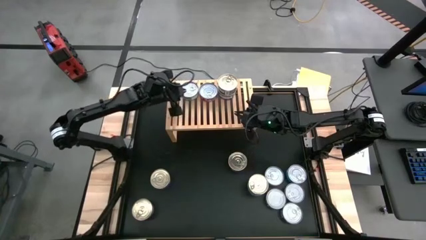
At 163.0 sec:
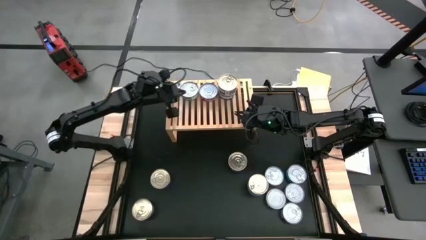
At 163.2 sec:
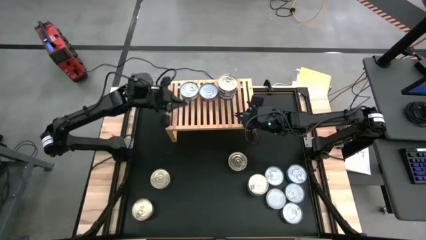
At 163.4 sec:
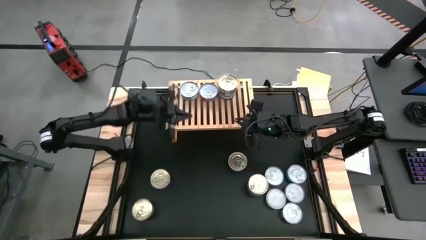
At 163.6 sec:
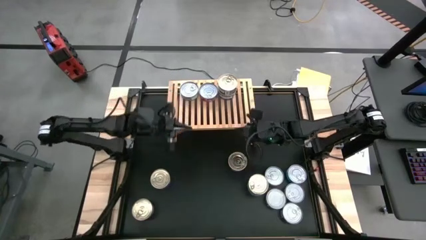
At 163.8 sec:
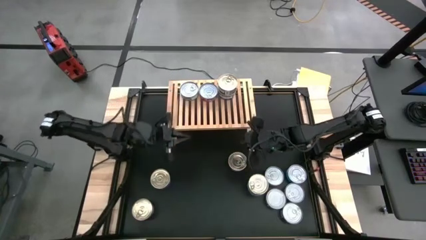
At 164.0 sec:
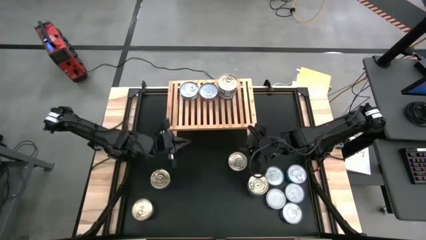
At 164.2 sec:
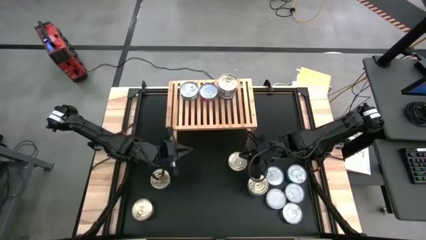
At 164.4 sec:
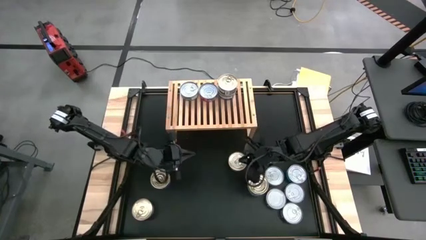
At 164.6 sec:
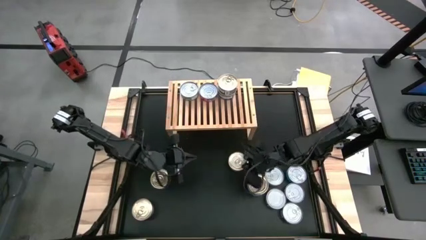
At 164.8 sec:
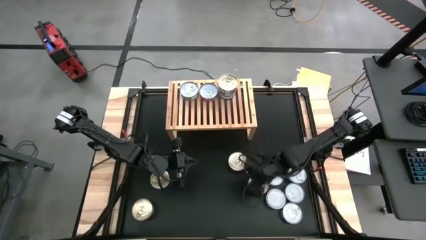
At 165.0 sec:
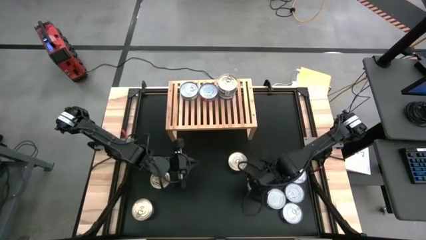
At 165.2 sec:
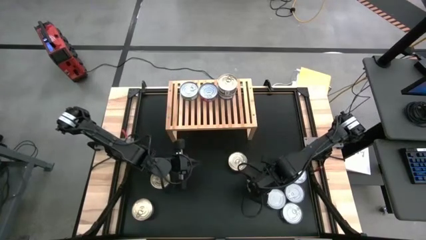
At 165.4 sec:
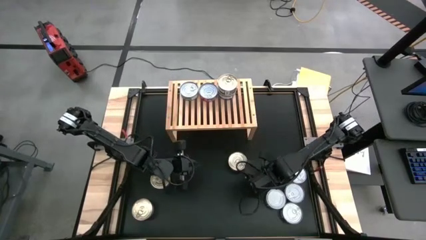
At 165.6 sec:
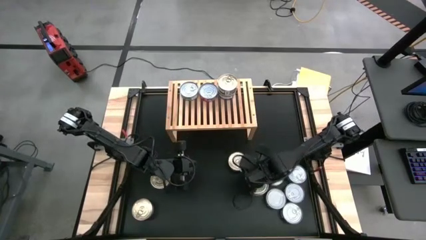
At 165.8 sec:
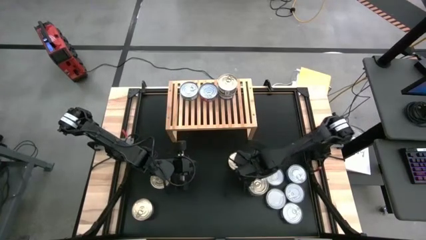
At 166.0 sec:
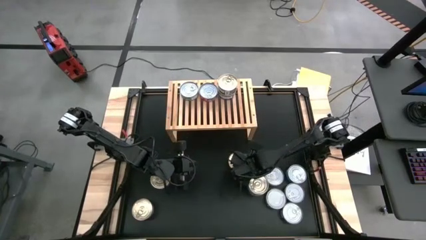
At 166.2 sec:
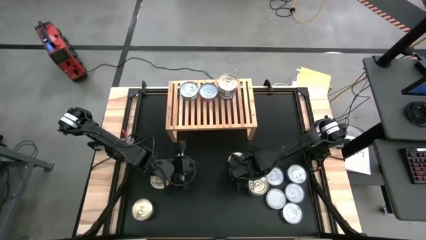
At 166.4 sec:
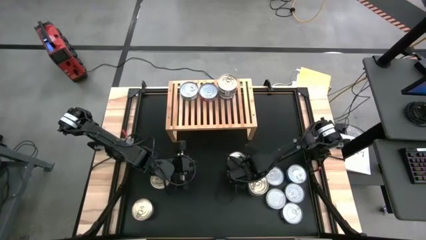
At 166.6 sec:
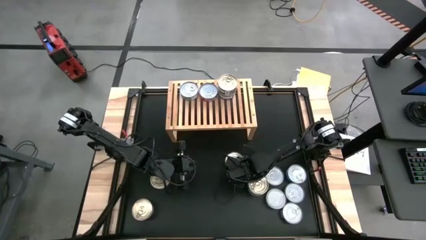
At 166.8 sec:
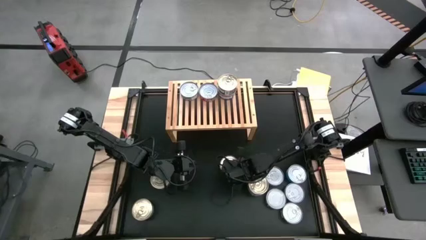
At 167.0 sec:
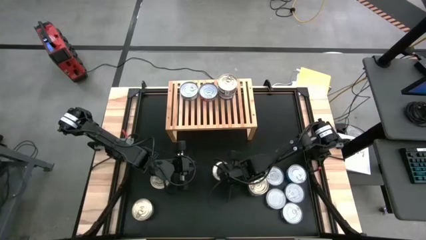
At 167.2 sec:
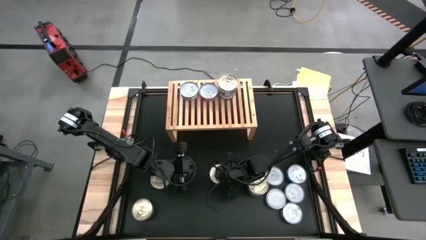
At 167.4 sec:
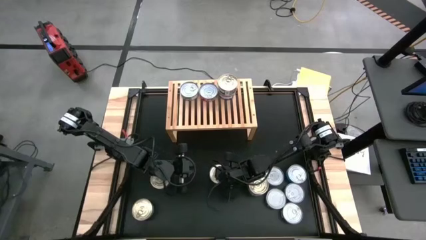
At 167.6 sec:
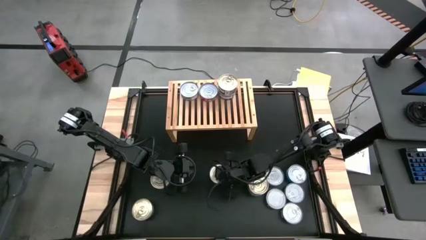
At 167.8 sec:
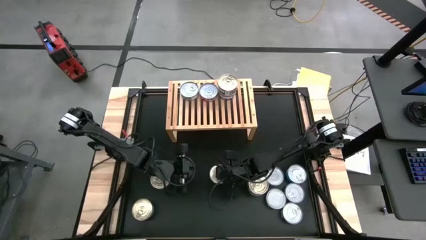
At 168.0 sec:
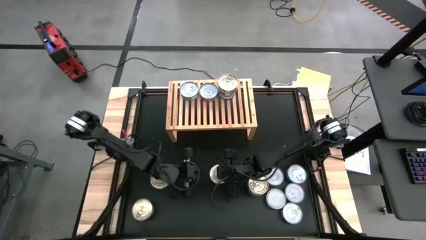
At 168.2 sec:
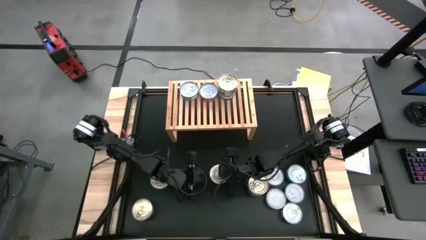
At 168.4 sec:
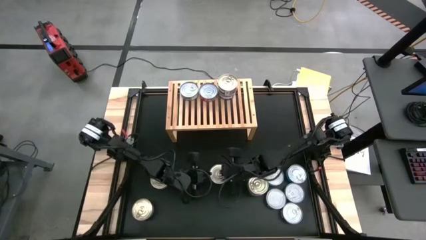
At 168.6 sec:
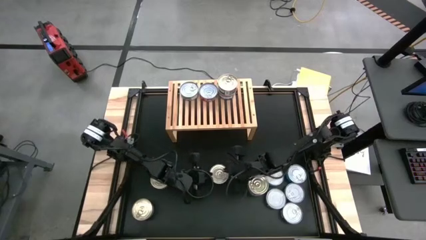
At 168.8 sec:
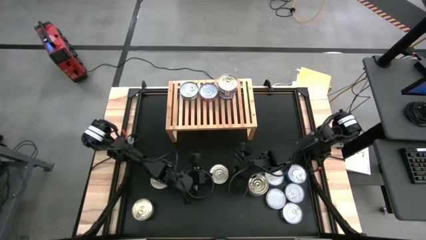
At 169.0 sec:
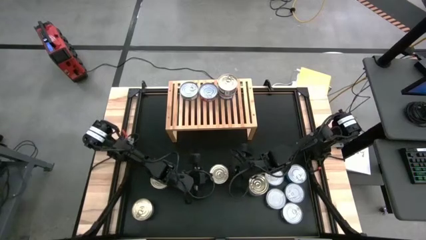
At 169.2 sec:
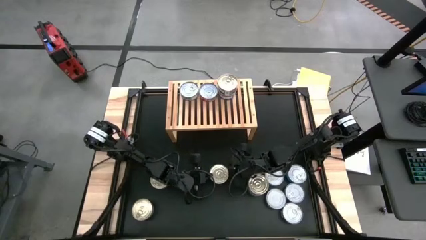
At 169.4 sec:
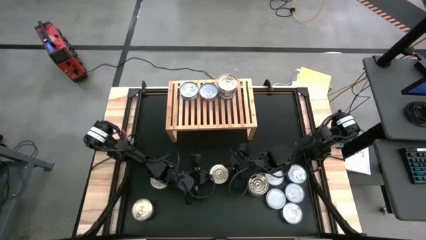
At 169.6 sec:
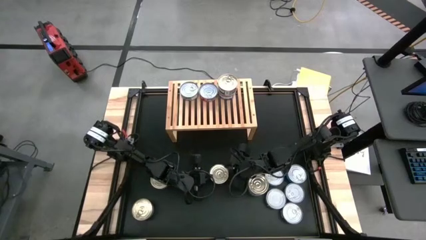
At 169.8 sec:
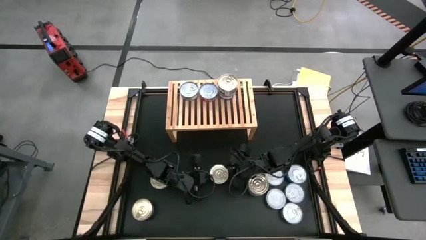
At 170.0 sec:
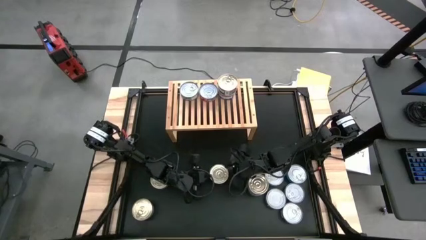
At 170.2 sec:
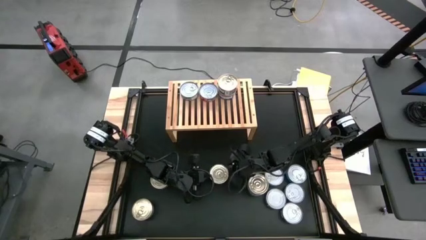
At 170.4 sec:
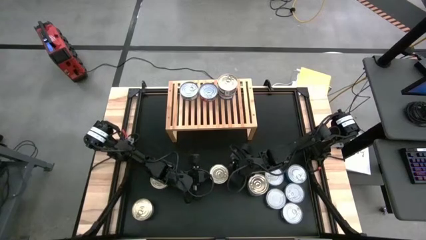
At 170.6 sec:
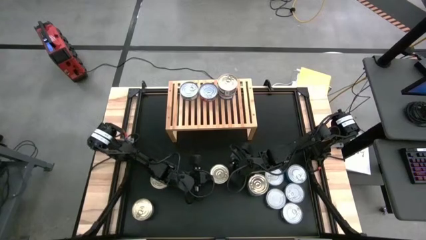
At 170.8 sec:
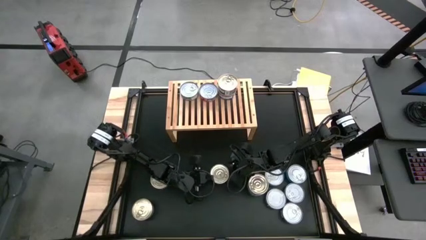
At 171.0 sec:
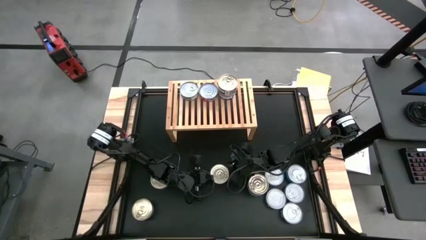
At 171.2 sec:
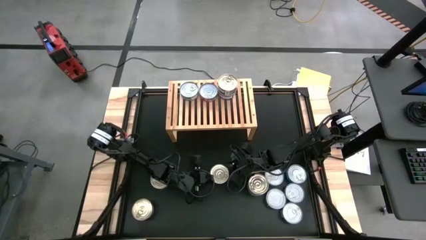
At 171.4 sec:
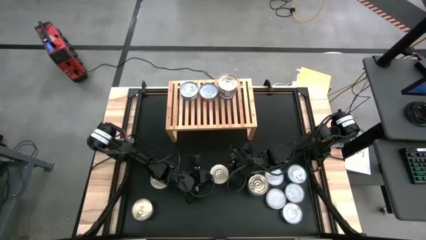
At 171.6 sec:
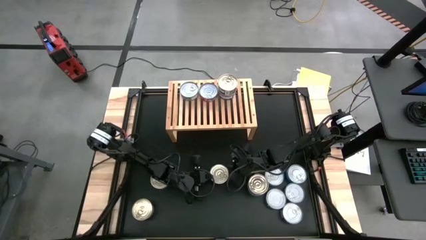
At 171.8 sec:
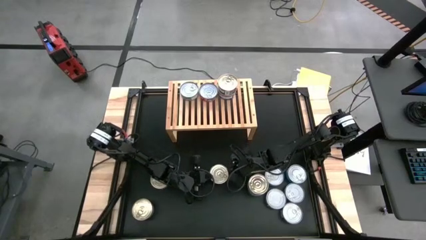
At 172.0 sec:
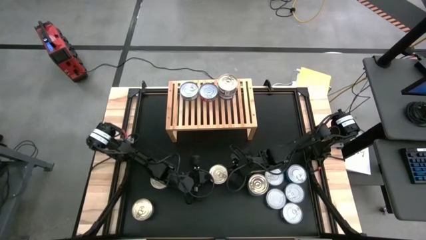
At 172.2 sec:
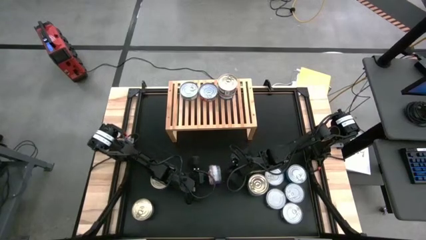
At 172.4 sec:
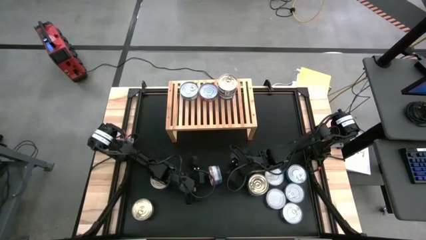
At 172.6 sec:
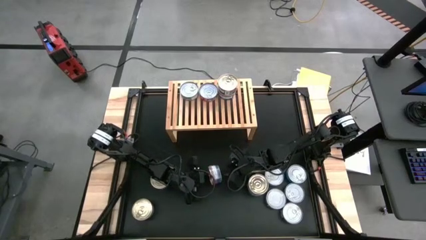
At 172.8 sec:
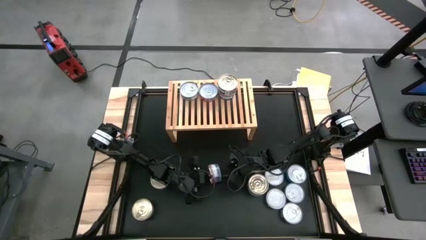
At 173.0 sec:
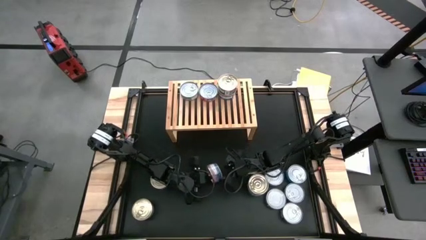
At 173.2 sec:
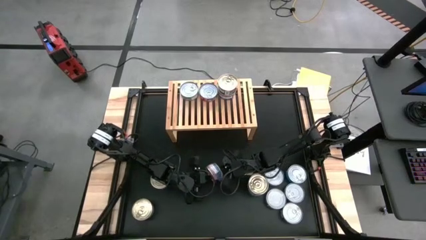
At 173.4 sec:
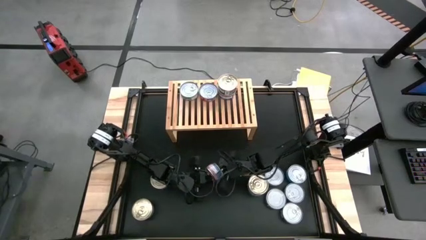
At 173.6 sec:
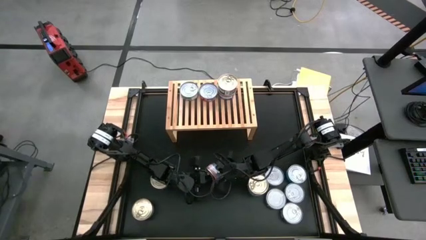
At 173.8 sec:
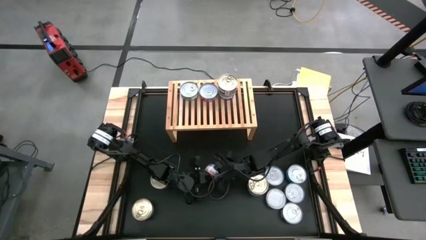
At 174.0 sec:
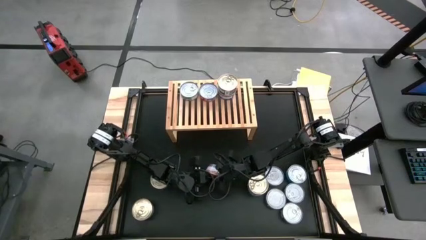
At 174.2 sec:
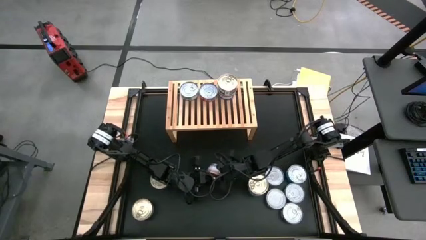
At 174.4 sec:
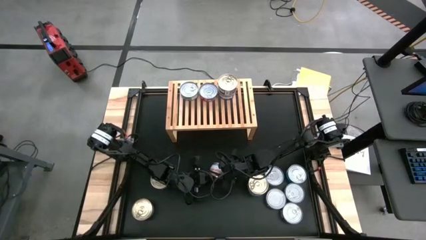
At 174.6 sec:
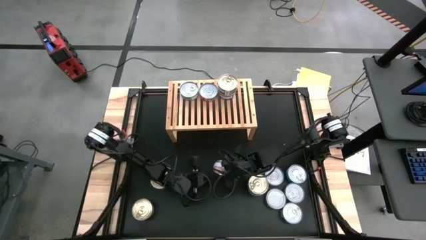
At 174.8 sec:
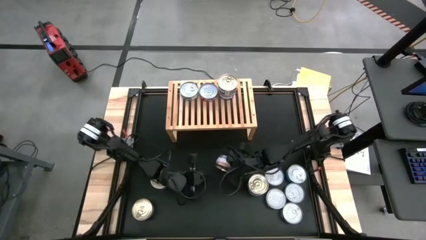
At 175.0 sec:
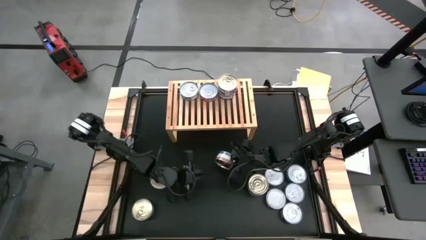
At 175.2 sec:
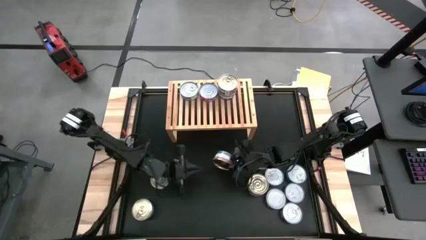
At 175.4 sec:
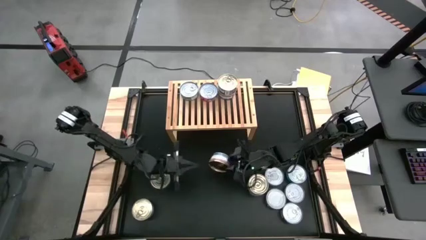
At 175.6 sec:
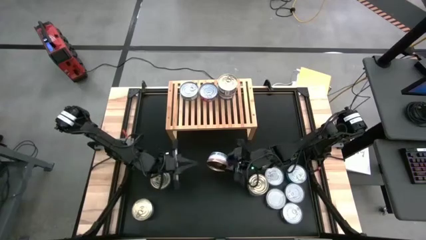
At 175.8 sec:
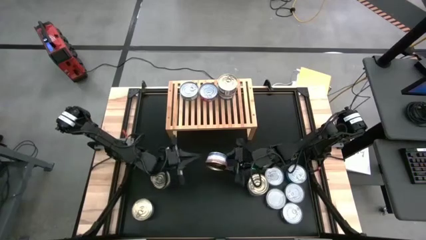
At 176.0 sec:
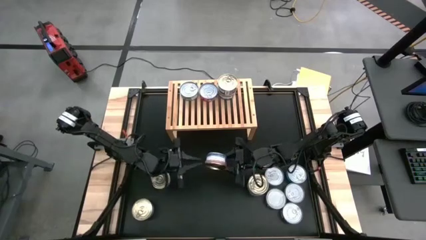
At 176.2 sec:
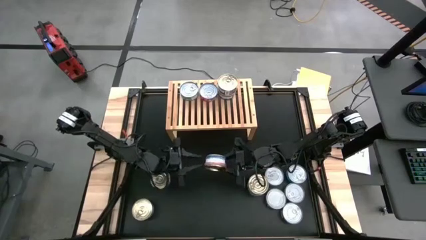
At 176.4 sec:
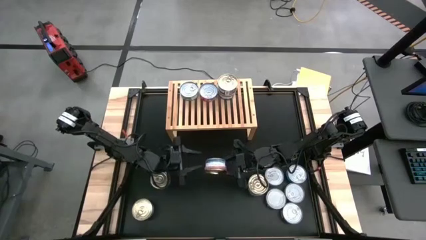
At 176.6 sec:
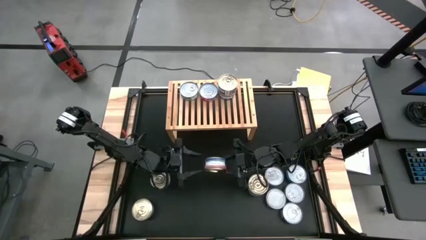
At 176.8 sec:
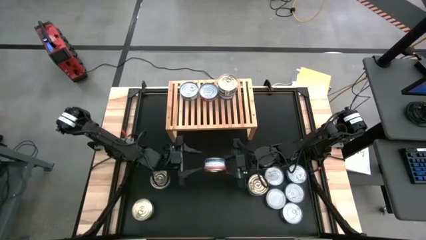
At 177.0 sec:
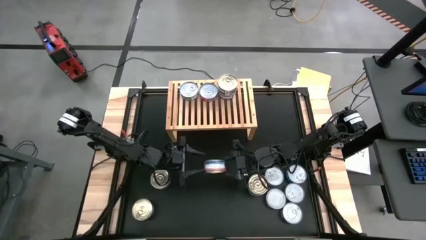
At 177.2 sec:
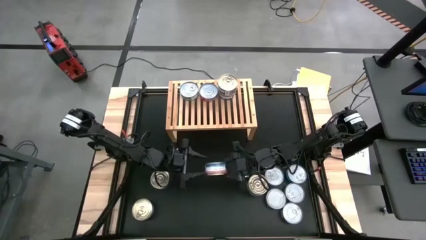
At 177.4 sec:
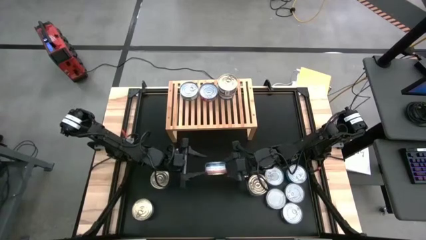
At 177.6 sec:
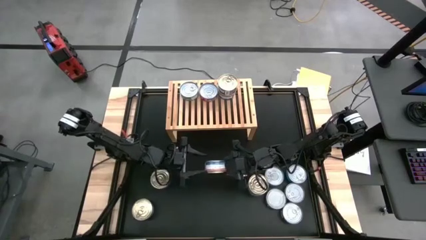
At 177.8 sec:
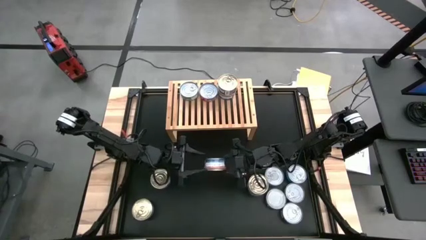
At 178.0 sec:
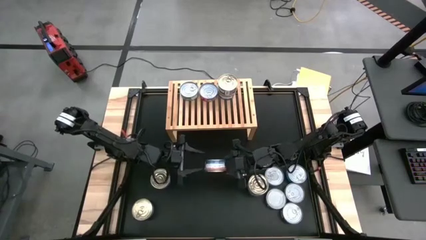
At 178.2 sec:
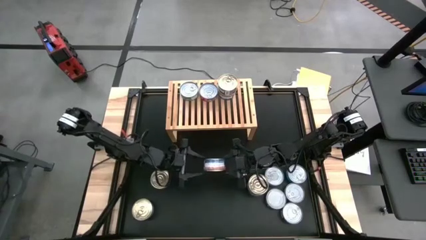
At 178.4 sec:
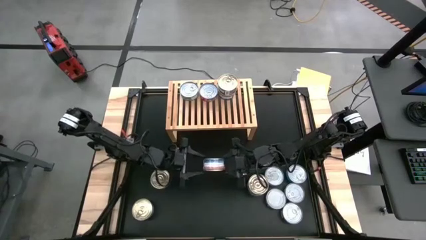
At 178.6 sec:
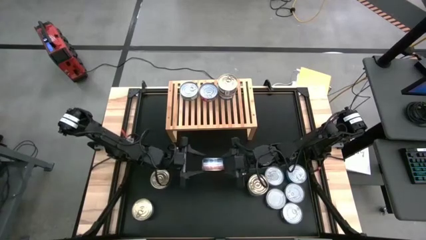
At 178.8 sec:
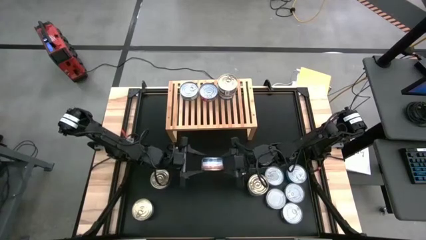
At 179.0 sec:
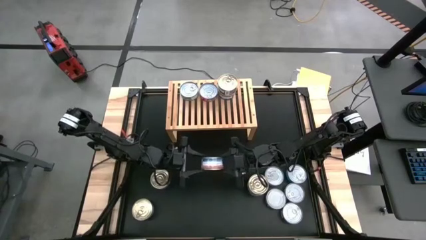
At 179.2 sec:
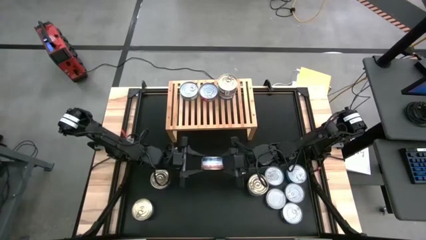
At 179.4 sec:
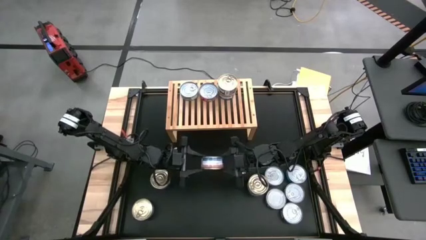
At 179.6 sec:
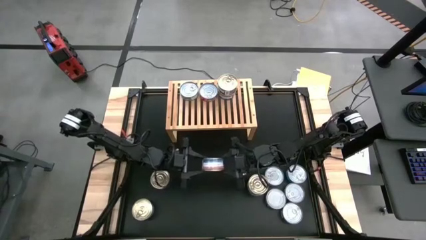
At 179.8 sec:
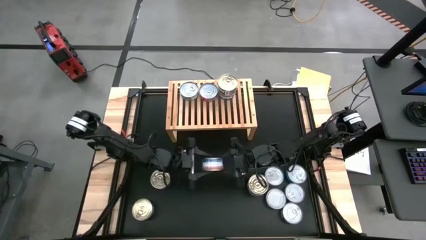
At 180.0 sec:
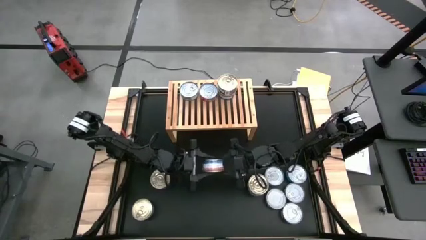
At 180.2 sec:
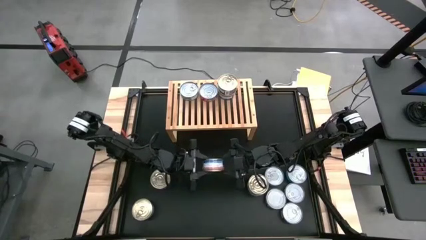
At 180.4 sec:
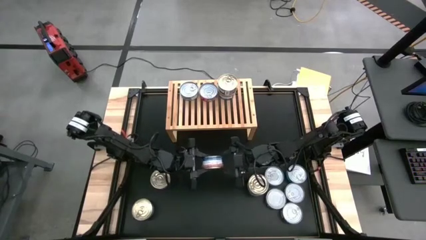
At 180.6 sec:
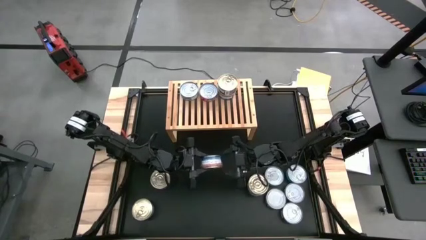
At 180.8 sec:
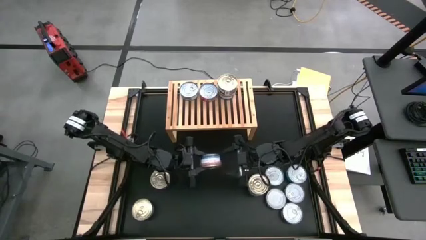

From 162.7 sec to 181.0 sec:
Task: Stack canned seafood by type on shelf
Put the blue and pink tuna can on the shelf
